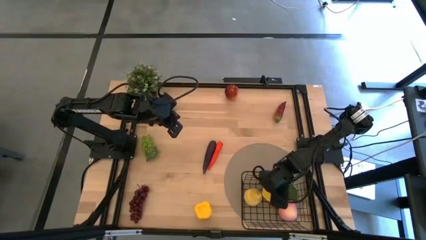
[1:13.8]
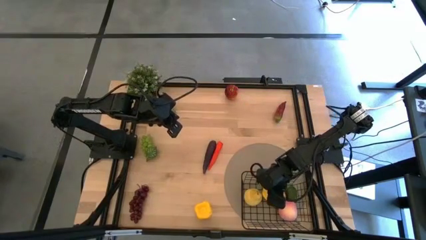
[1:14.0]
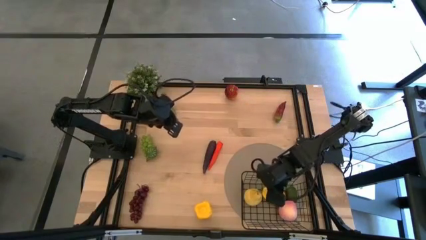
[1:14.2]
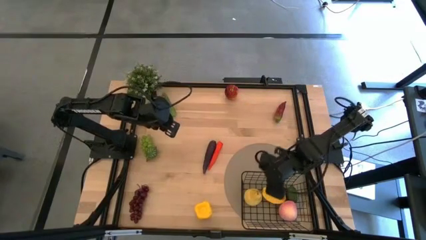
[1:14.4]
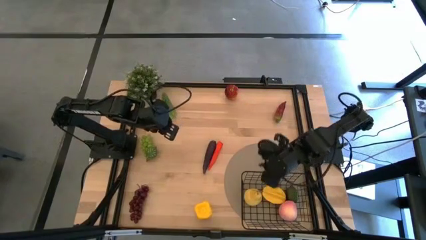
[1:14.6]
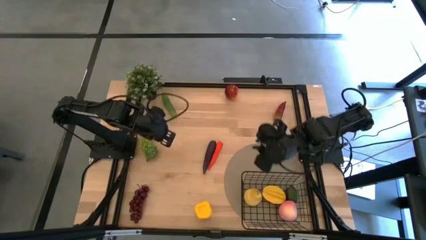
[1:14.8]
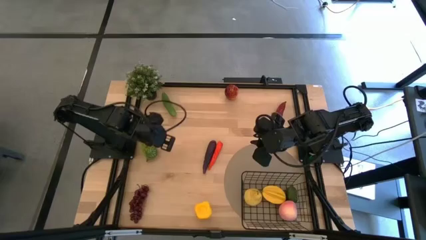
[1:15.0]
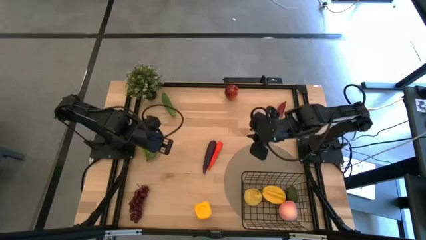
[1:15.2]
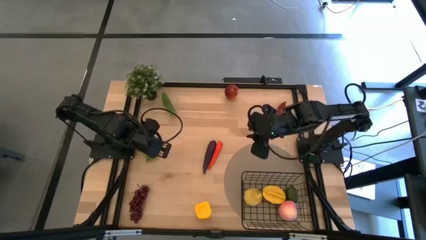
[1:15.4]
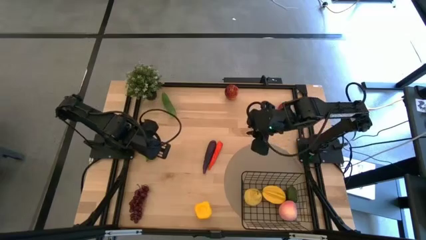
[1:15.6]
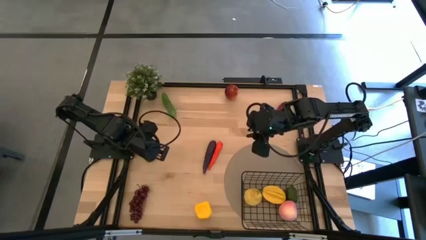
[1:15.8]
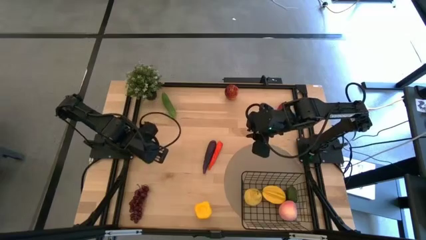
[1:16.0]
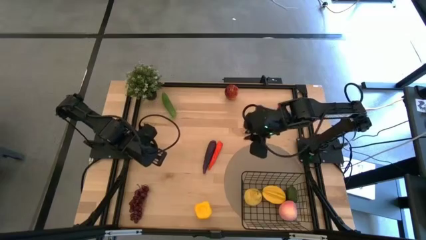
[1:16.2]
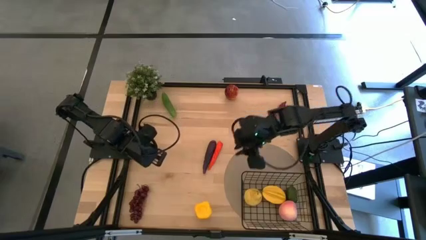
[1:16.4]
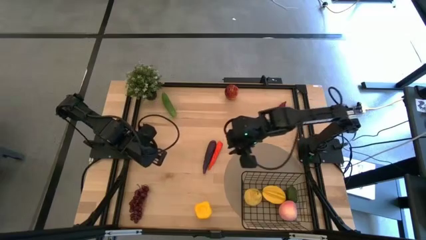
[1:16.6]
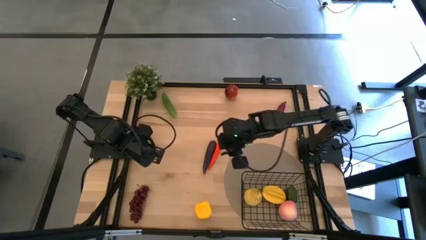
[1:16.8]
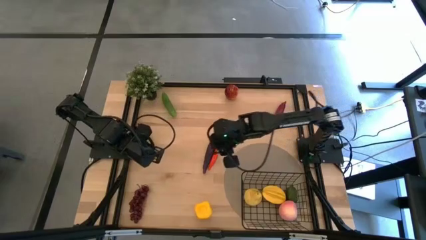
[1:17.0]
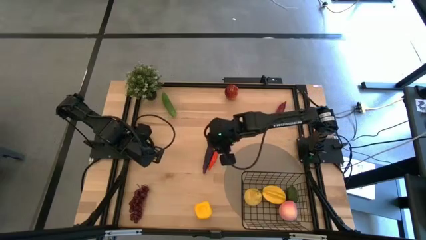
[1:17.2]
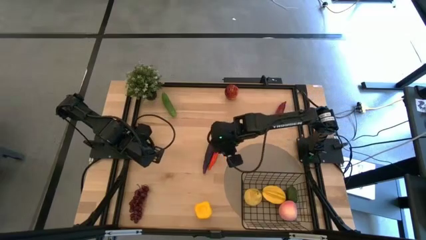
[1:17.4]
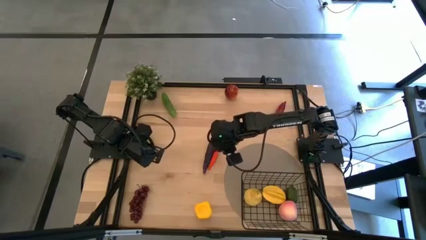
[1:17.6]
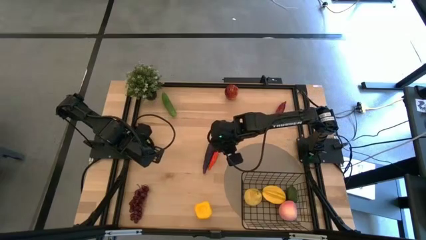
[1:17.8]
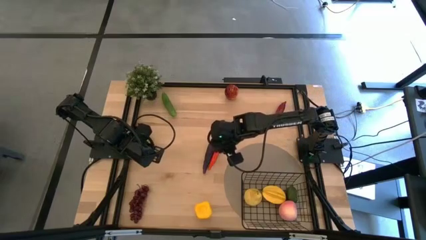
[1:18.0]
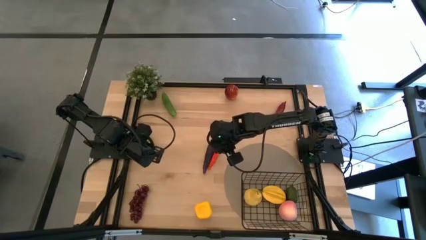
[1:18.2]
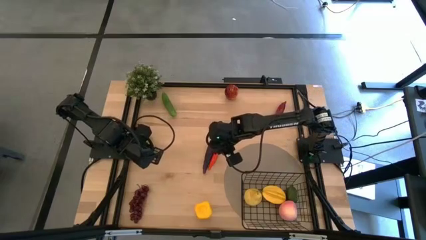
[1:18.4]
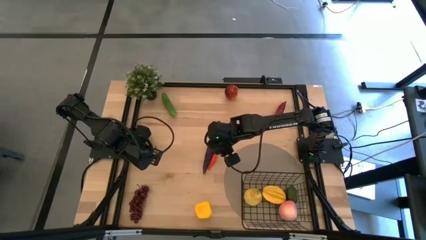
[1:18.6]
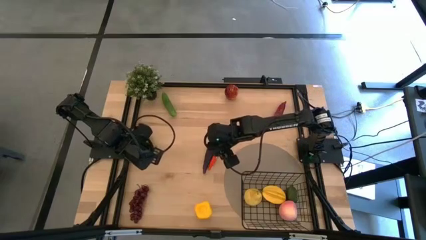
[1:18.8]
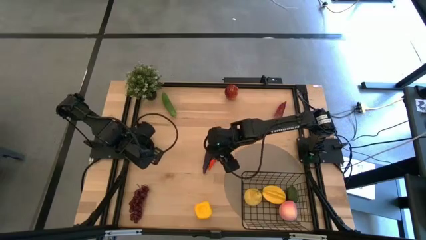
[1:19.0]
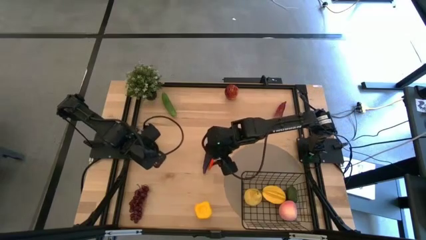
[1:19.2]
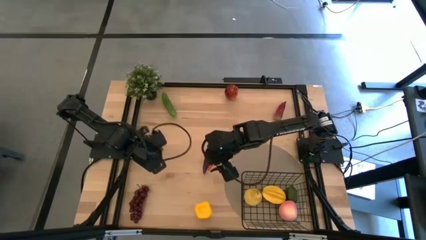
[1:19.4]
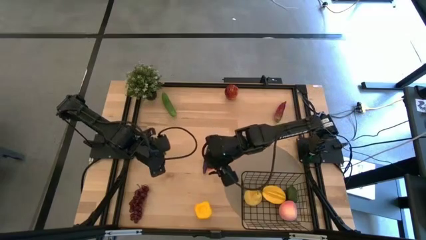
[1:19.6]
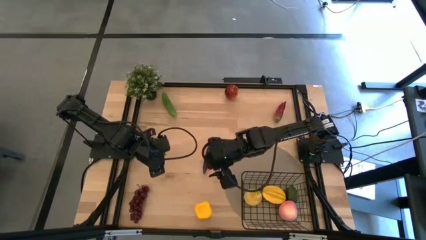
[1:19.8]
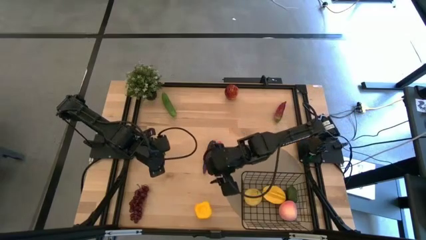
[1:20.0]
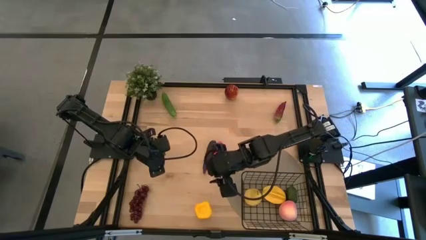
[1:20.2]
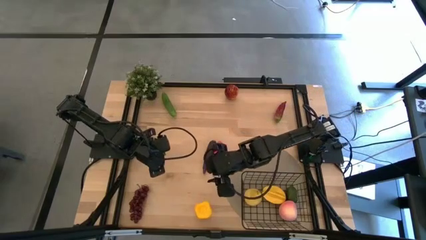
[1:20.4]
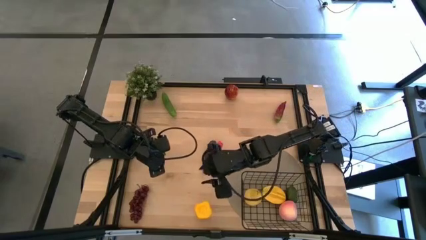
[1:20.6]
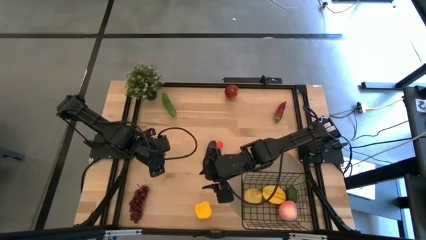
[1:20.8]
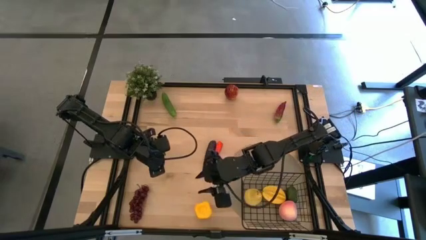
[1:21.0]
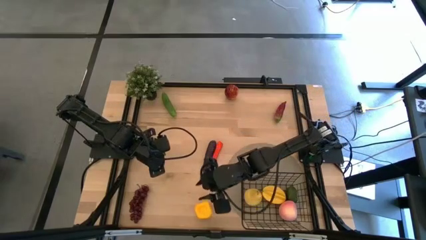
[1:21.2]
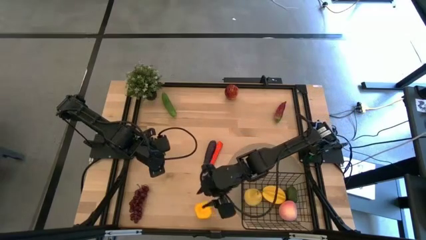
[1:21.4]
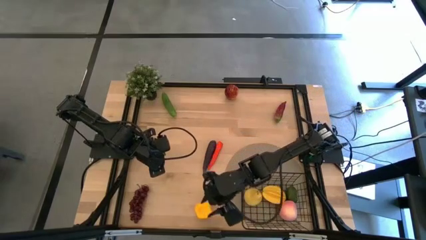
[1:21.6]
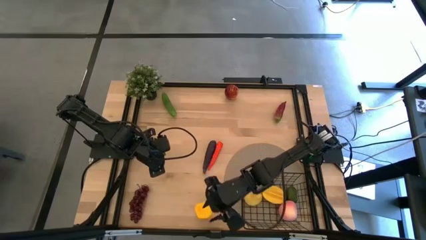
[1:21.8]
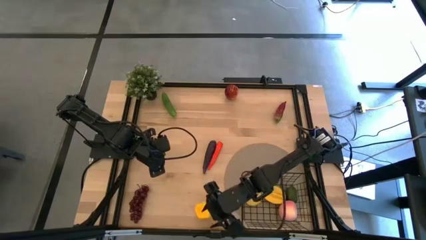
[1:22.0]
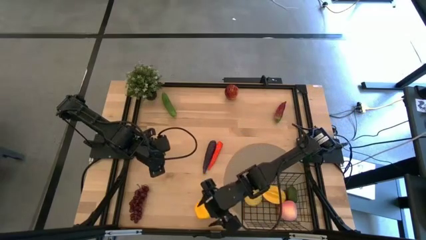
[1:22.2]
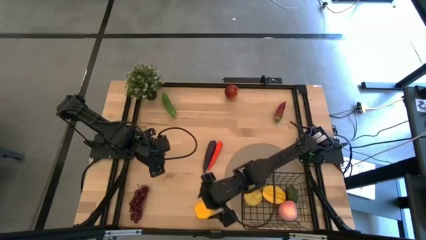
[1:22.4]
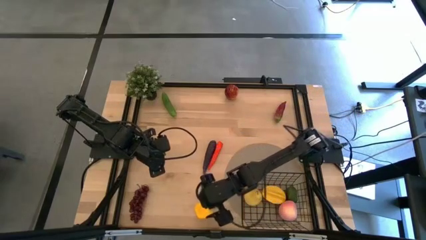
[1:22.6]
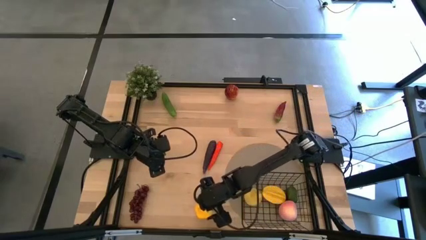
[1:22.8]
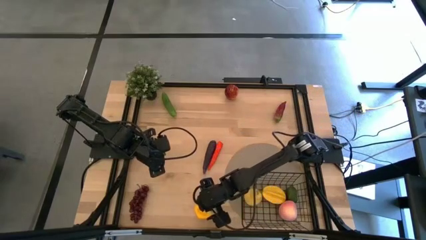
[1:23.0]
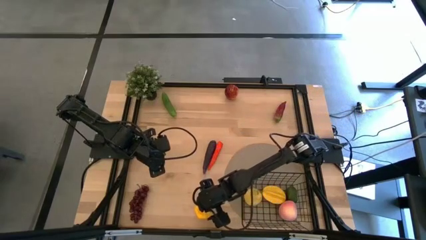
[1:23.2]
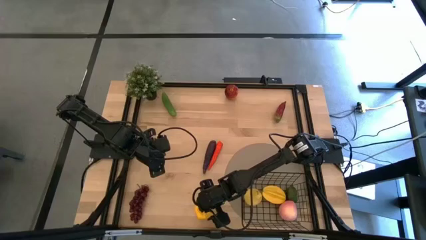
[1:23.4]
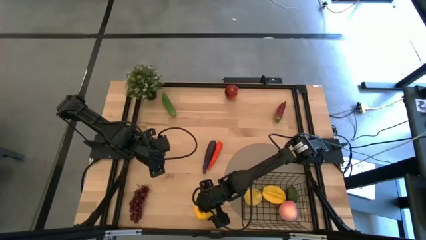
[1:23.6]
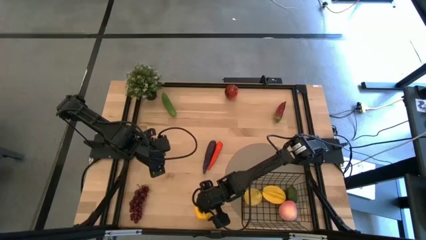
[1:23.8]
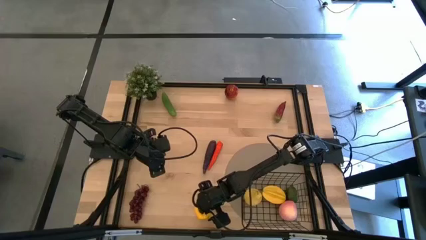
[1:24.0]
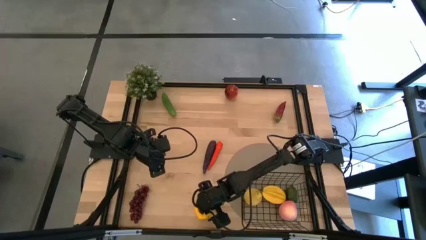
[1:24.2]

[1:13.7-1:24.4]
Task: Build produce basket
Put the yellow bell pepper into the wire basket

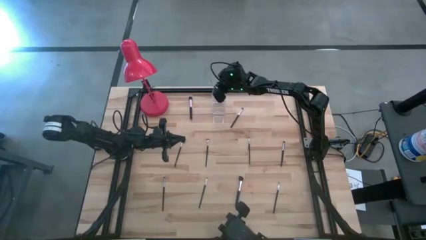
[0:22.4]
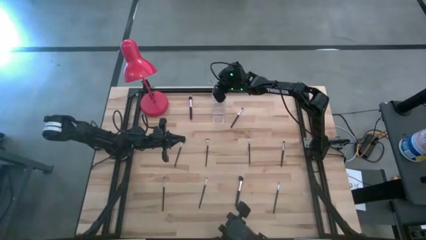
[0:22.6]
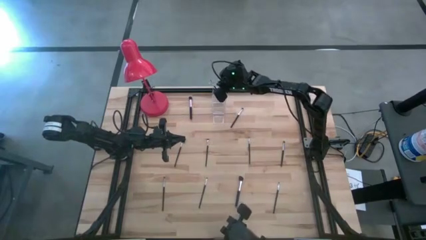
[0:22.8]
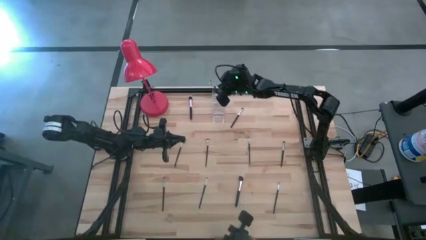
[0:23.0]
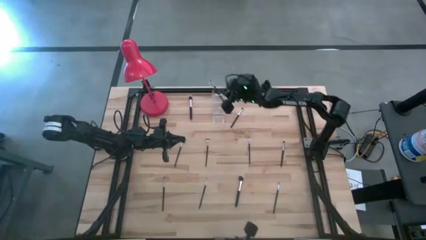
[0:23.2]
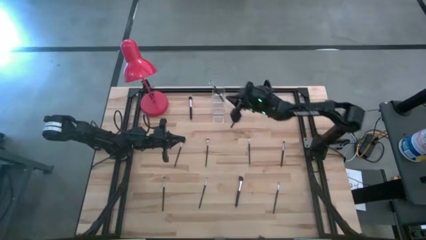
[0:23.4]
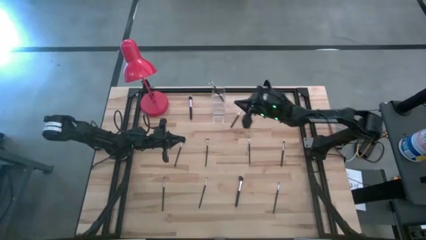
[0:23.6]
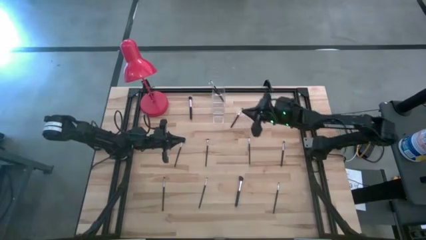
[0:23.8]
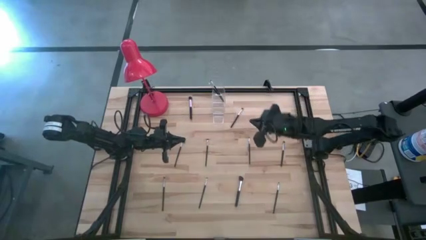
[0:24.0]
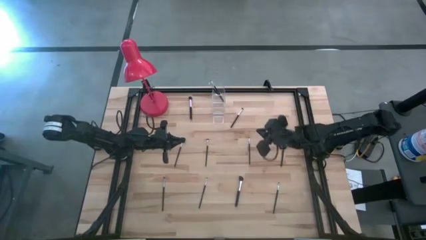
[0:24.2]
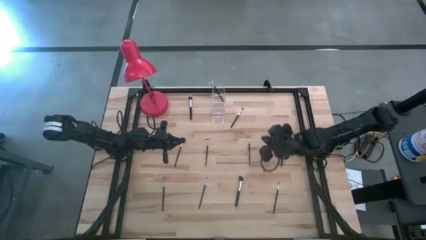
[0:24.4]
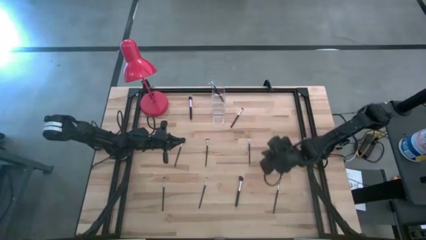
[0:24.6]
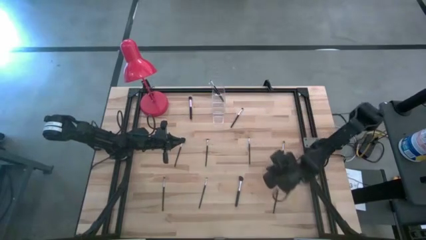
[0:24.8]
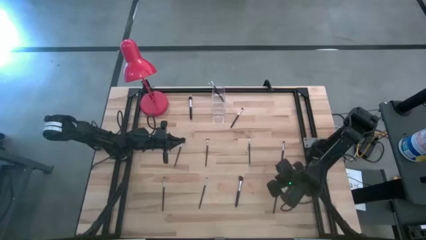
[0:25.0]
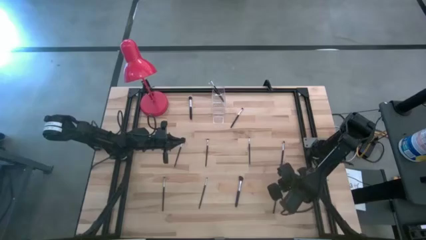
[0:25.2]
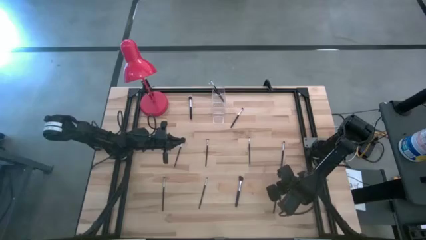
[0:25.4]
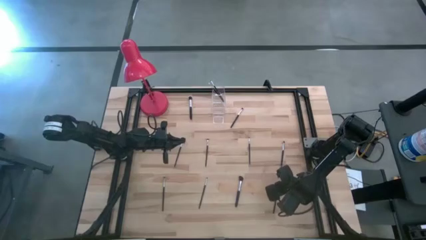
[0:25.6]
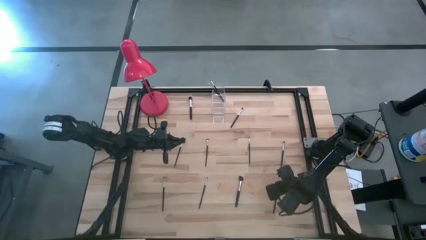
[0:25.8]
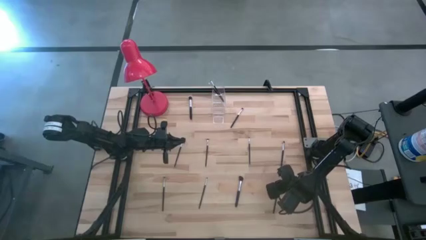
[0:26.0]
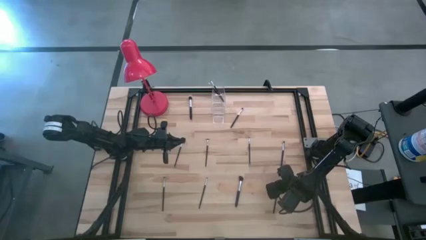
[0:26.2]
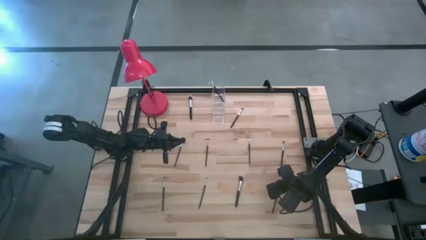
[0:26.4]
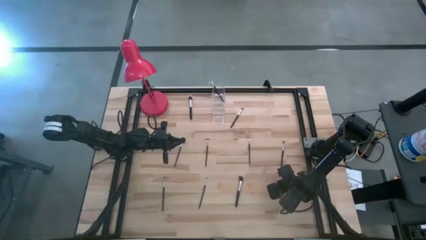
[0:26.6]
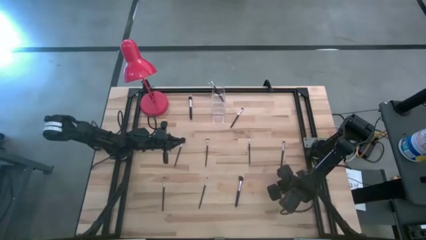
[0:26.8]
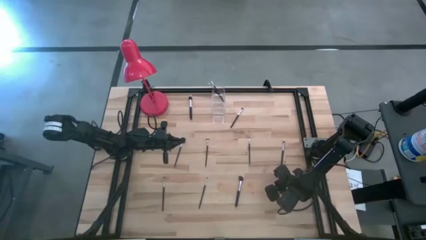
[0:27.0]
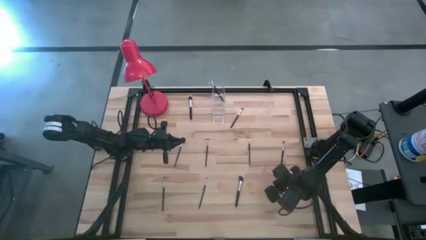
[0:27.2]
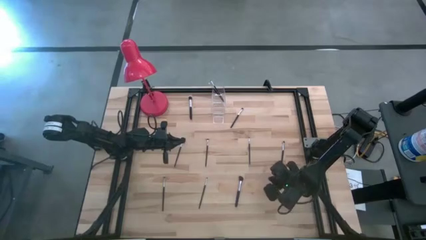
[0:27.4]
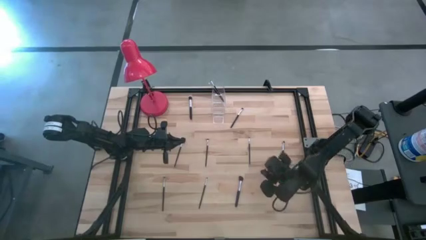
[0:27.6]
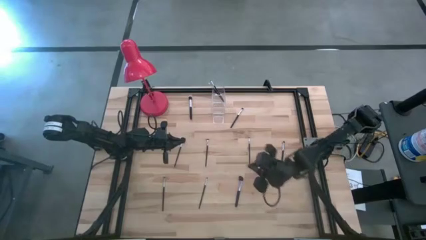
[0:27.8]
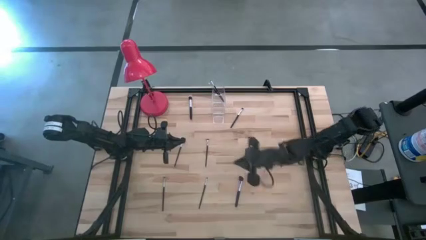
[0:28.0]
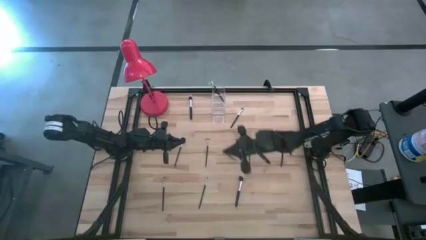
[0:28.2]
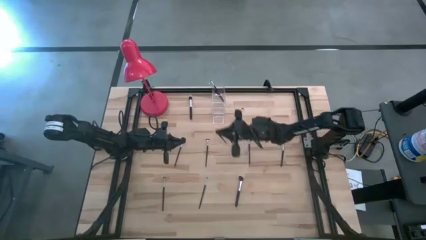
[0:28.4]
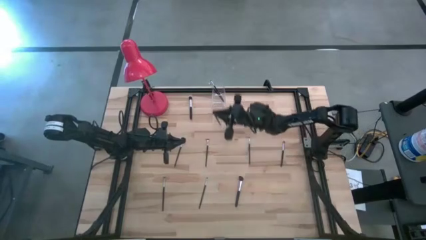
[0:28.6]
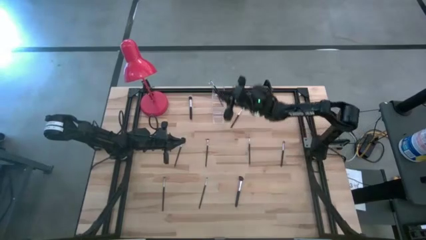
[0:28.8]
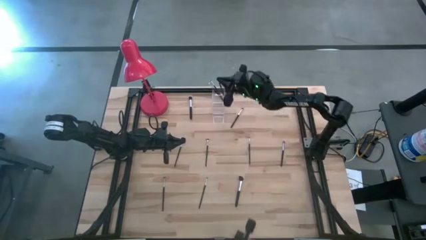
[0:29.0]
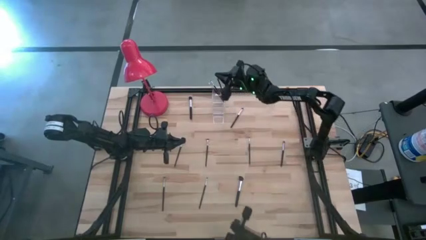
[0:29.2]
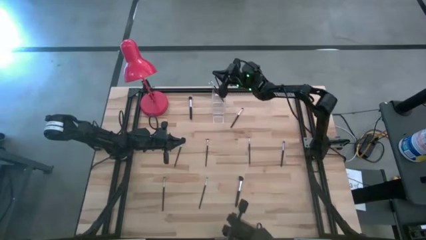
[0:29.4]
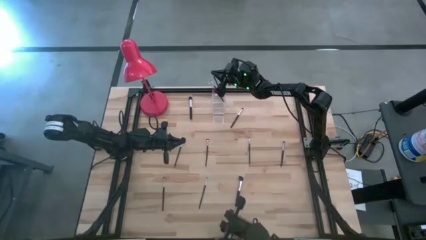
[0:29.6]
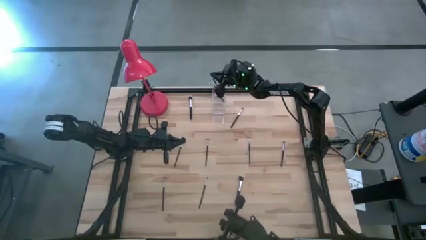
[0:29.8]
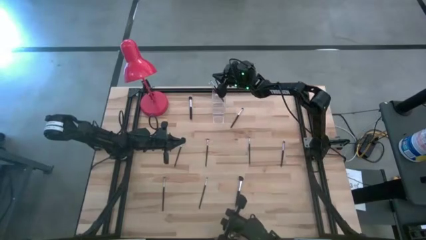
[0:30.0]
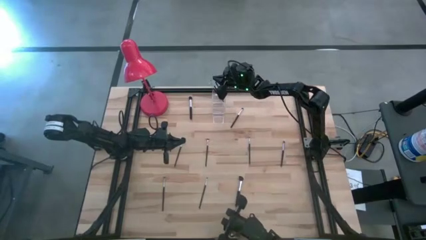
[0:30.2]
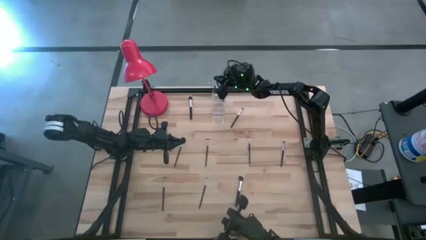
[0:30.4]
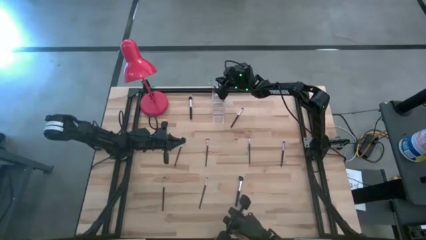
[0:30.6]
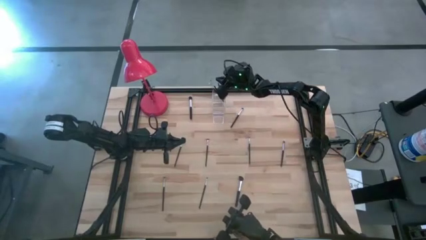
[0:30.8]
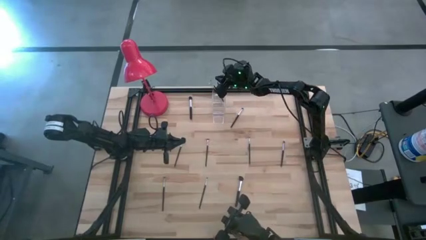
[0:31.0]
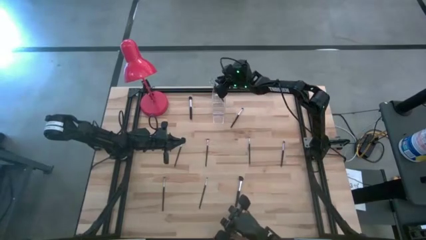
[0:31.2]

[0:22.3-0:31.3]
Task: Put items in baskets/containers
Put the black eyeshadow brush into the transparent organizer
